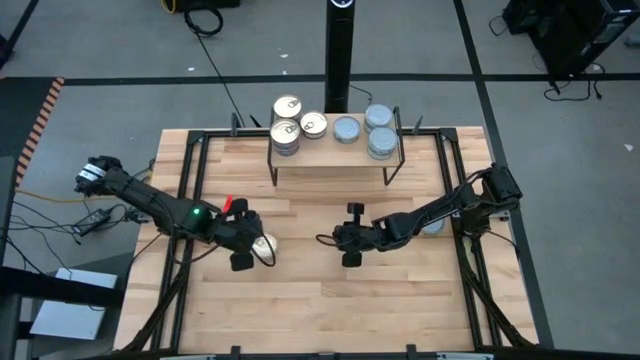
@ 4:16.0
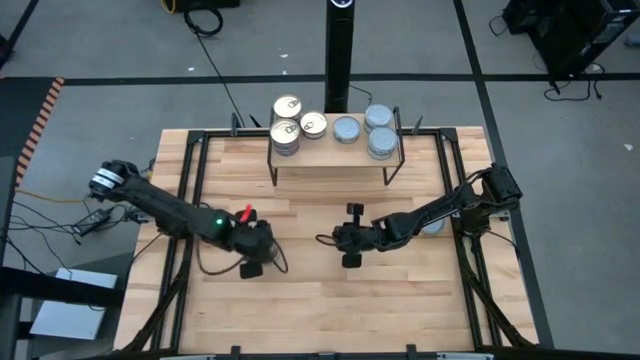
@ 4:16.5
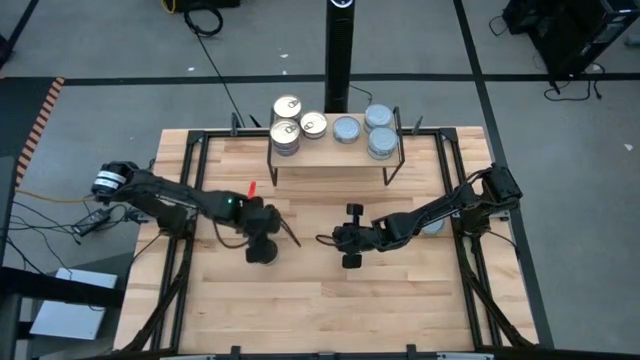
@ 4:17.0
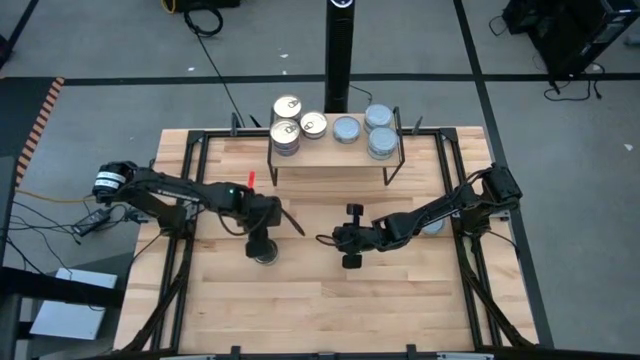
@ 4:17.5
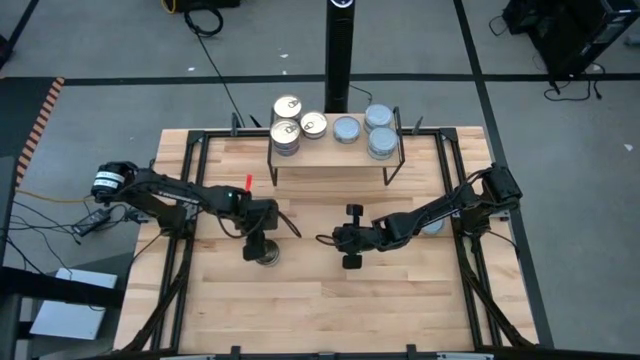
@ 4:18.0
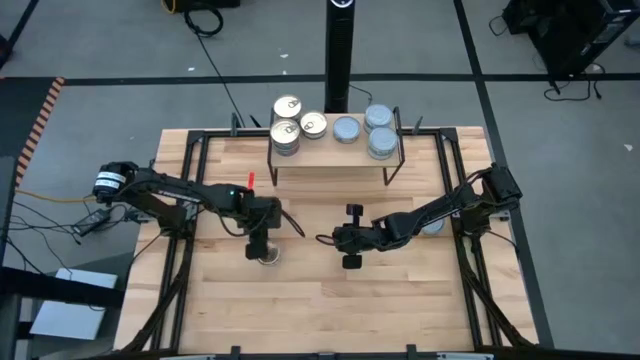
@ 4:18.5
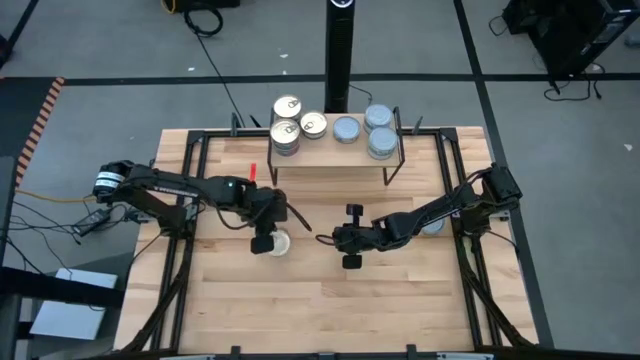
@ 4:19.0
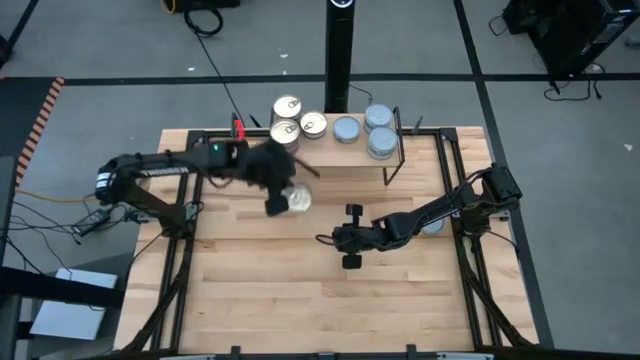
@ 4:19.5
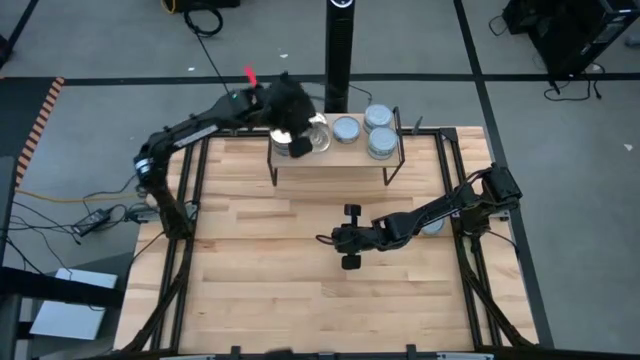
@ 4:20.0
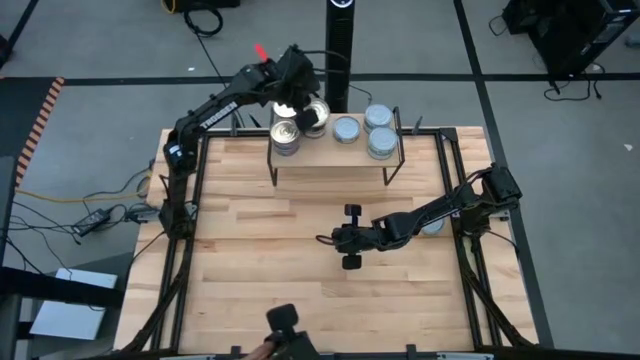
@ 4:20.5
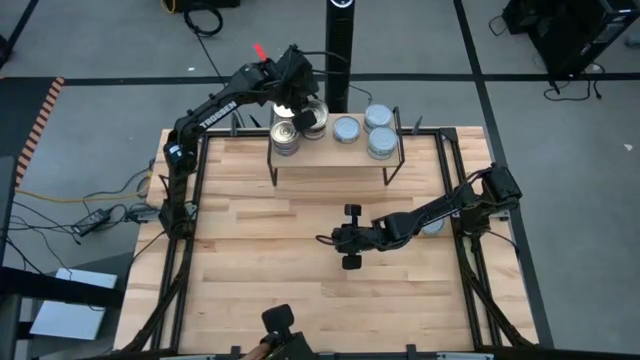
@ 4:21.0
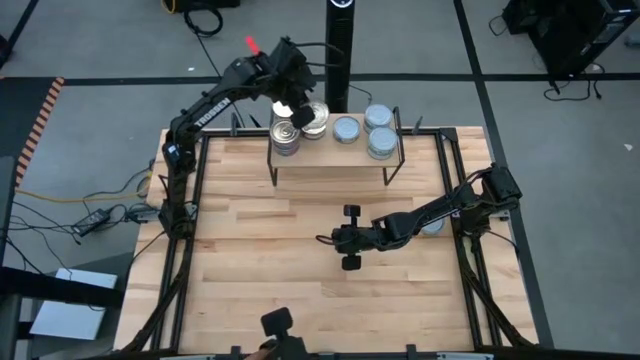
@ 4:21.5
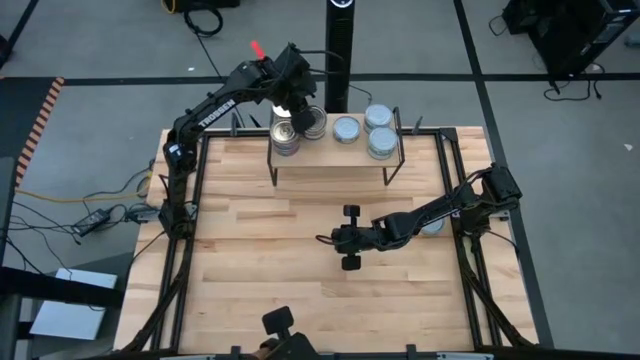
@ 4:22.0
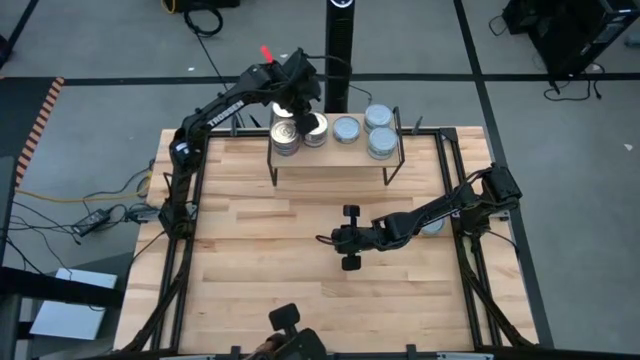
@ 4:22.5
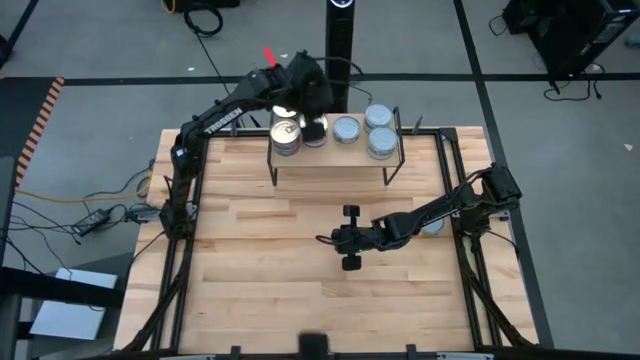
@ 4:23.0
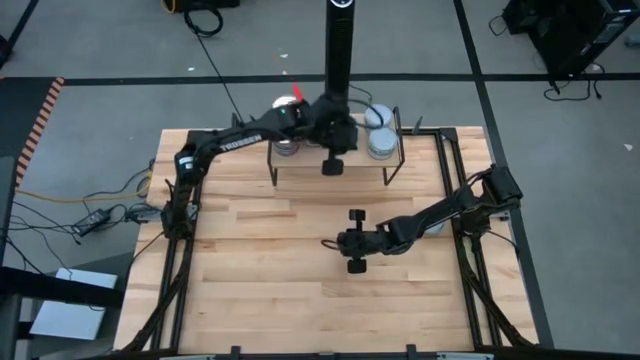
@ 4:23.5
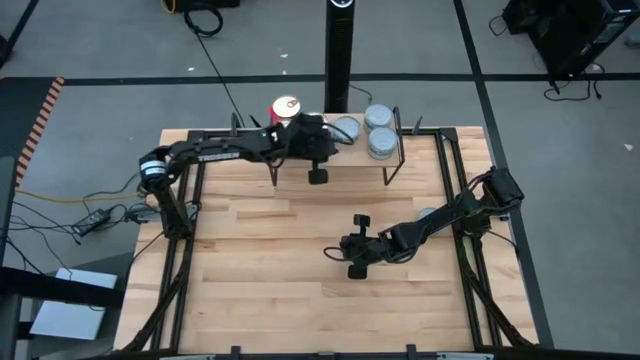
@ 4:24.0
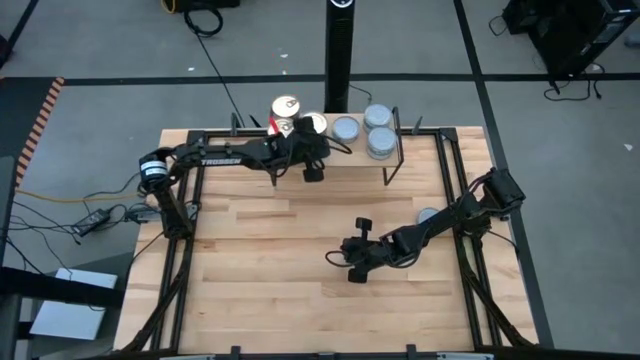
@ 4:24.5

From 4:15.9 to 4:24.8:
Task: Stack canned seafood by type on shelf
Stack the blue pink tuna can on the right blue tuna can on the shelf

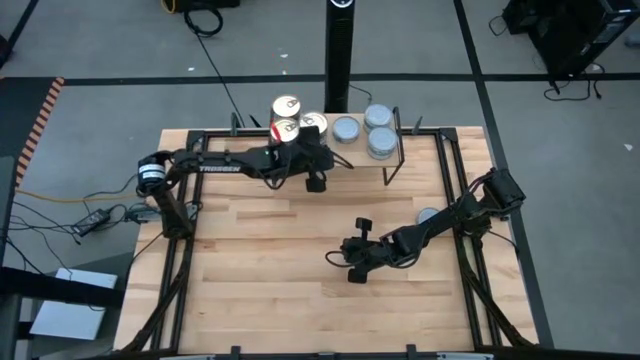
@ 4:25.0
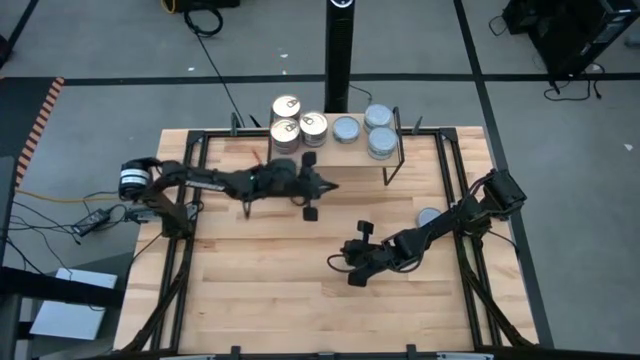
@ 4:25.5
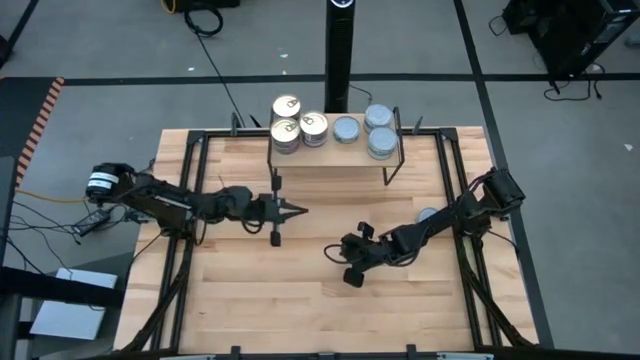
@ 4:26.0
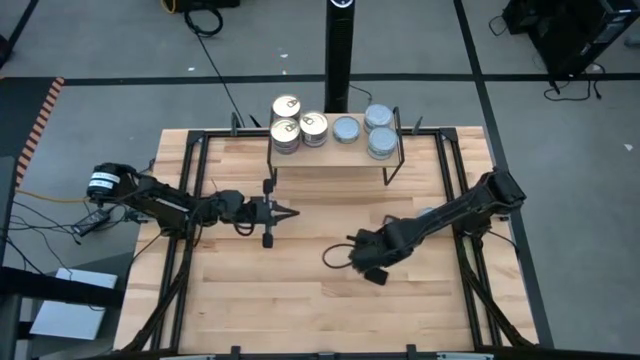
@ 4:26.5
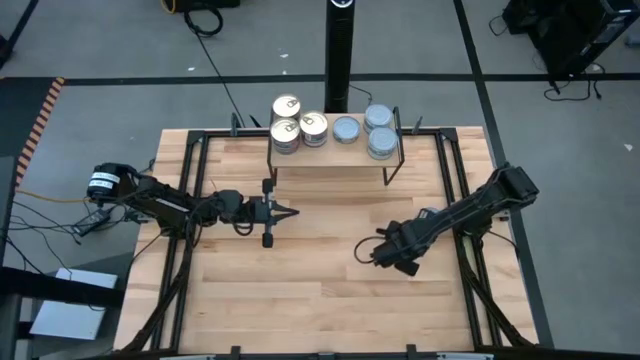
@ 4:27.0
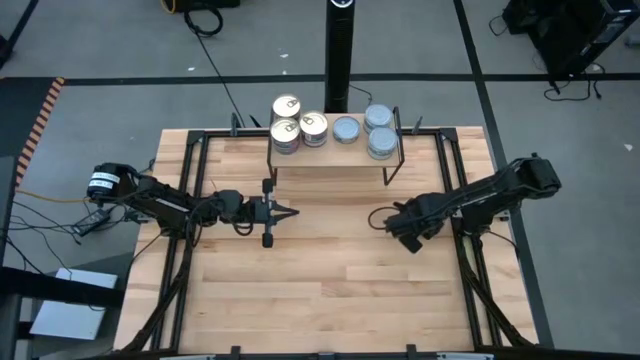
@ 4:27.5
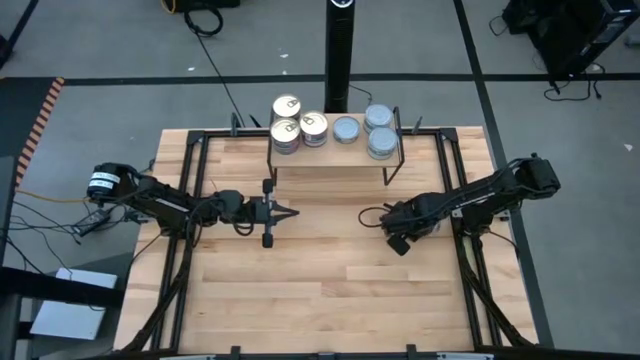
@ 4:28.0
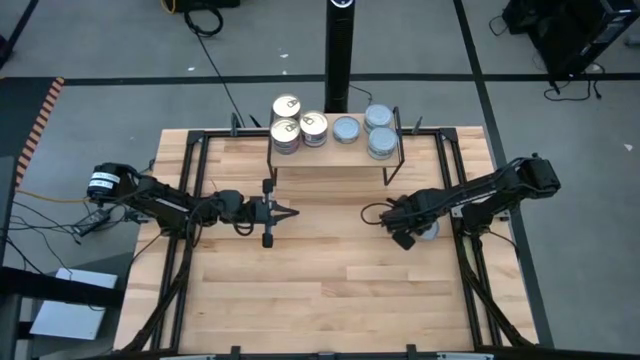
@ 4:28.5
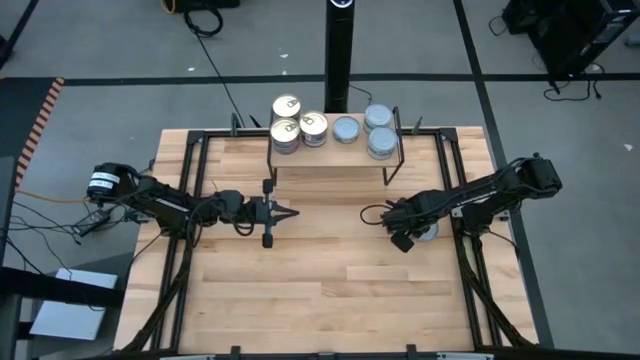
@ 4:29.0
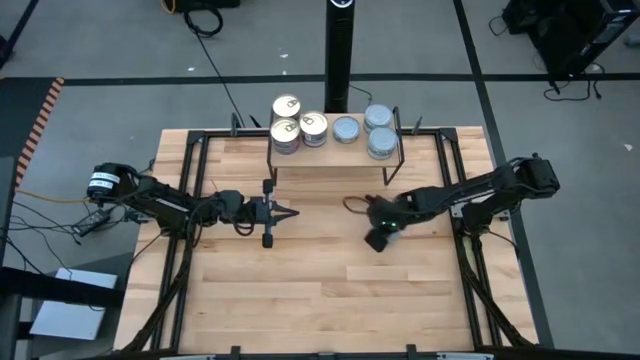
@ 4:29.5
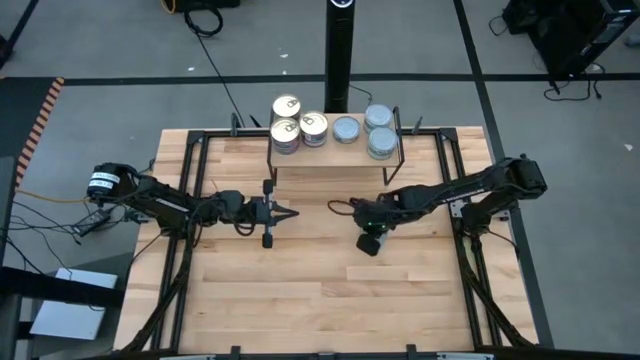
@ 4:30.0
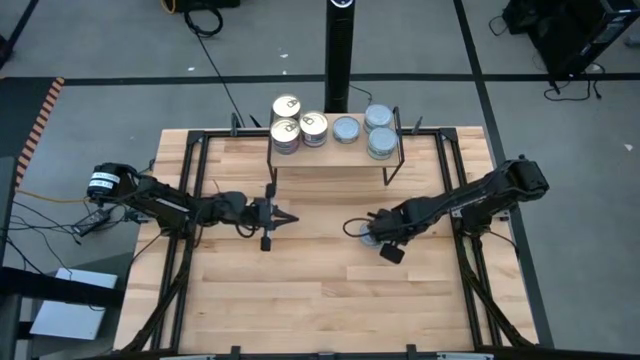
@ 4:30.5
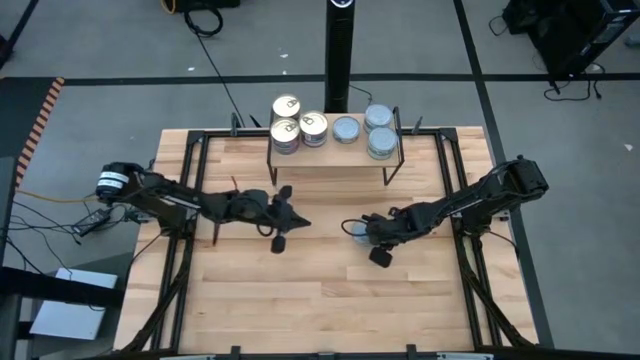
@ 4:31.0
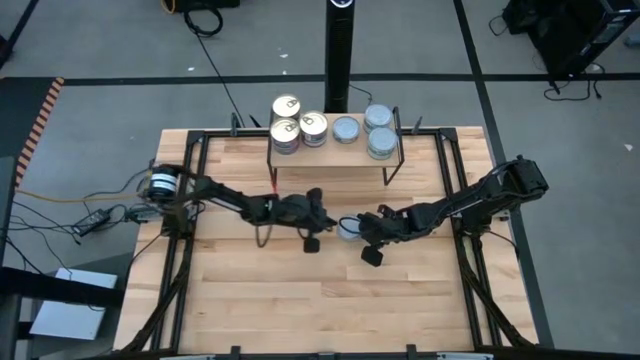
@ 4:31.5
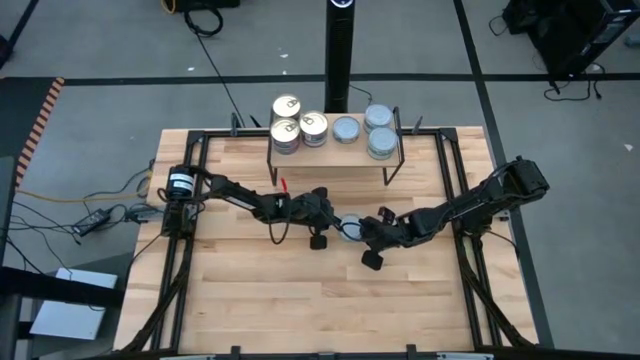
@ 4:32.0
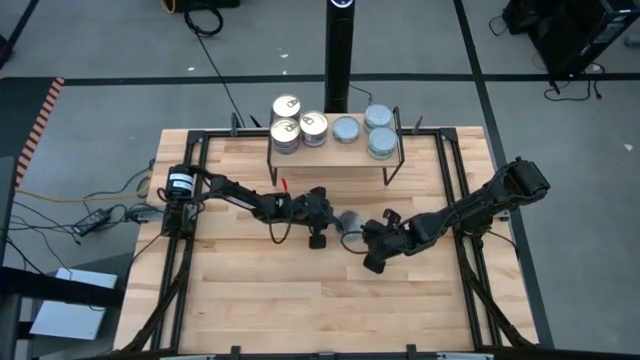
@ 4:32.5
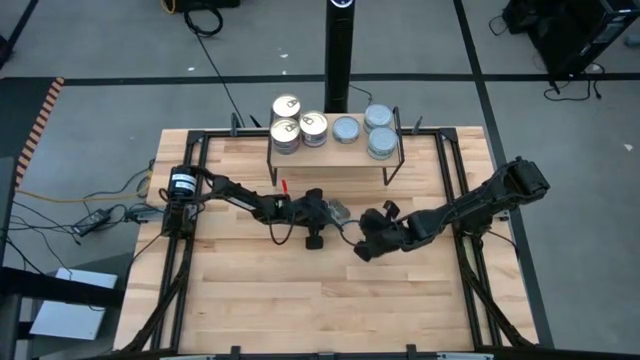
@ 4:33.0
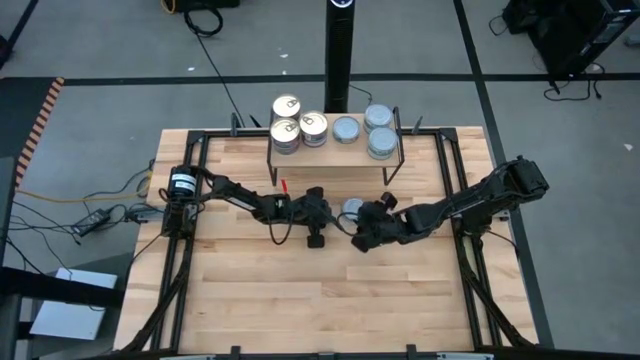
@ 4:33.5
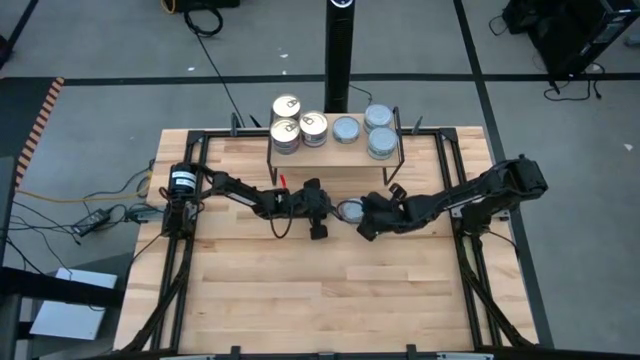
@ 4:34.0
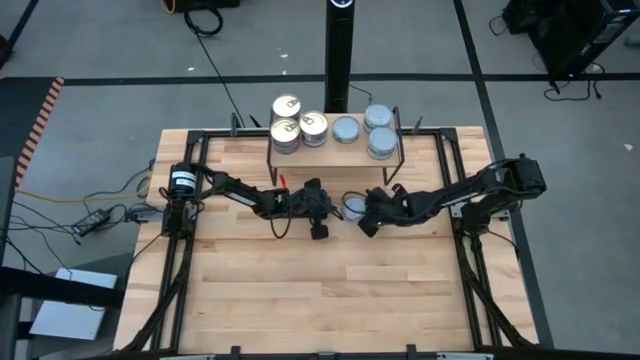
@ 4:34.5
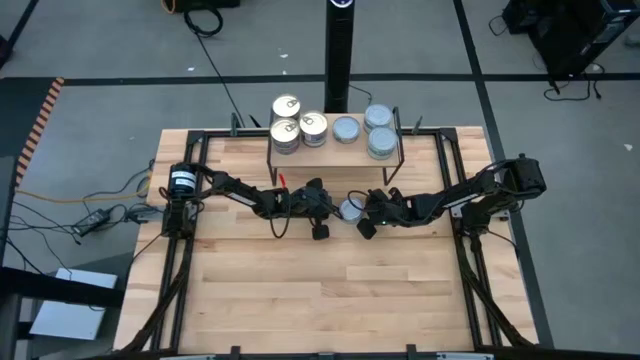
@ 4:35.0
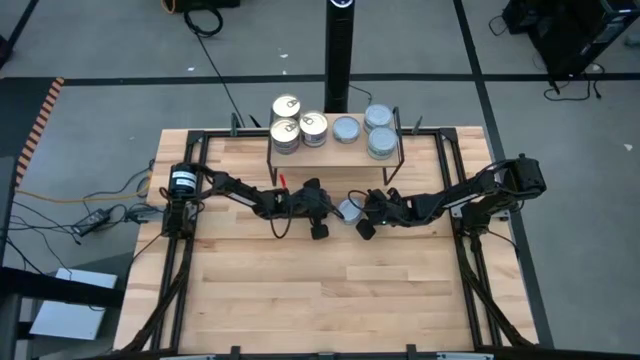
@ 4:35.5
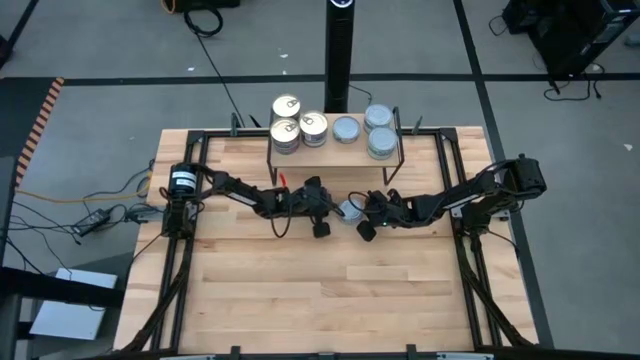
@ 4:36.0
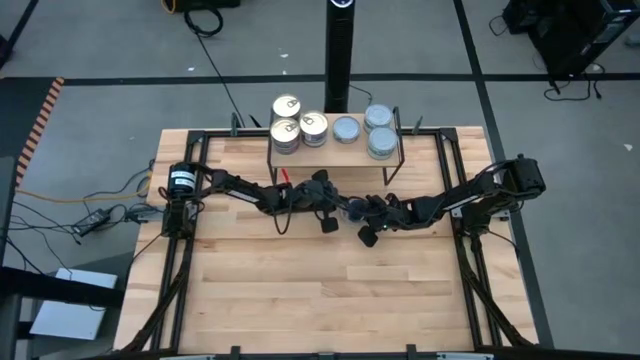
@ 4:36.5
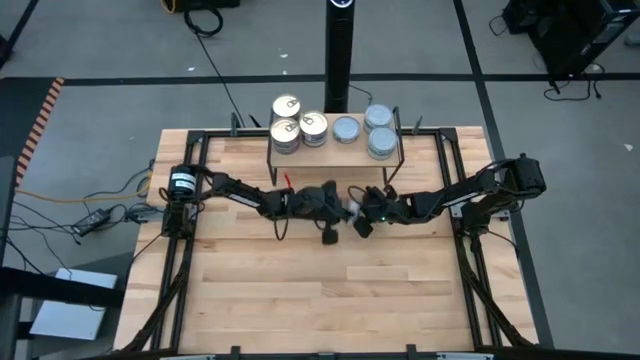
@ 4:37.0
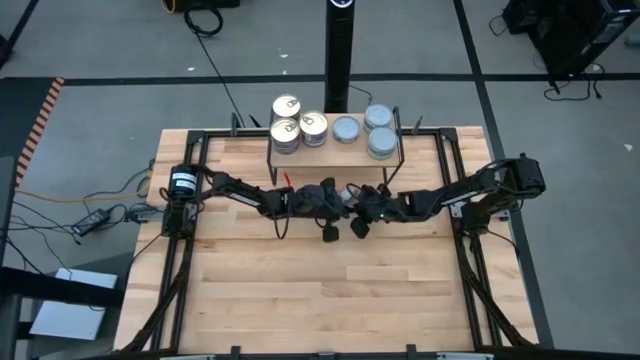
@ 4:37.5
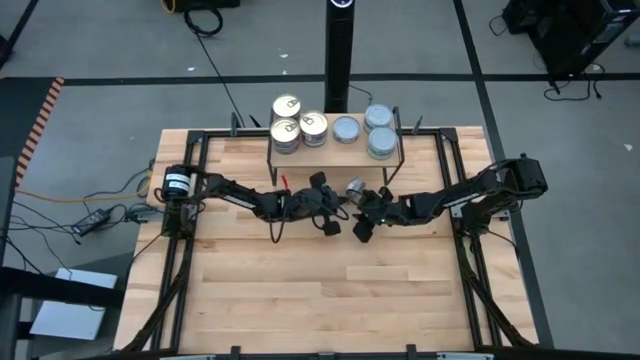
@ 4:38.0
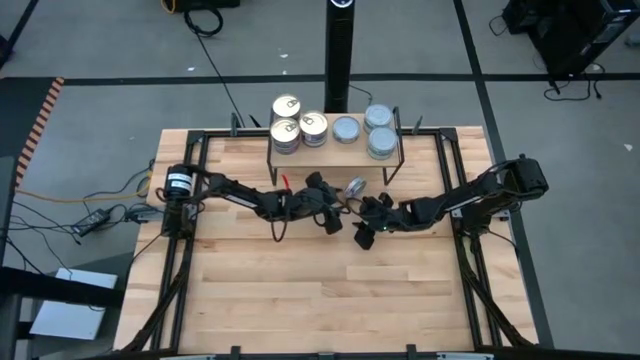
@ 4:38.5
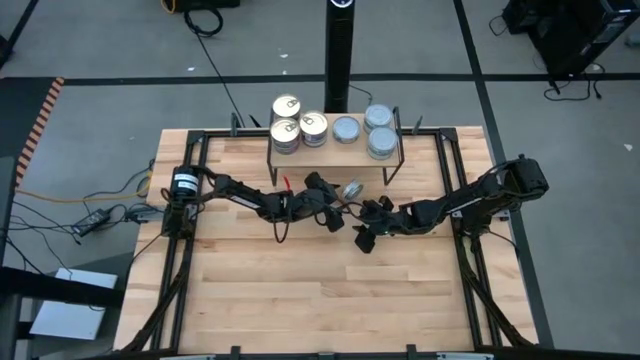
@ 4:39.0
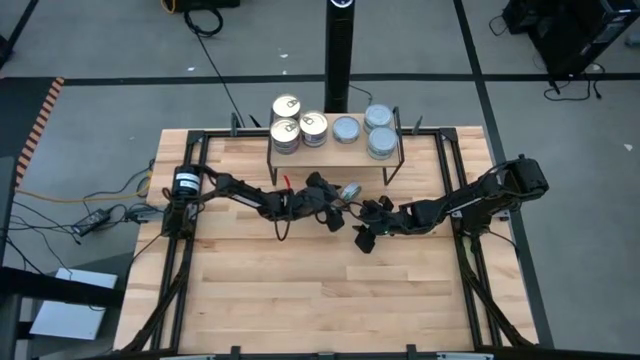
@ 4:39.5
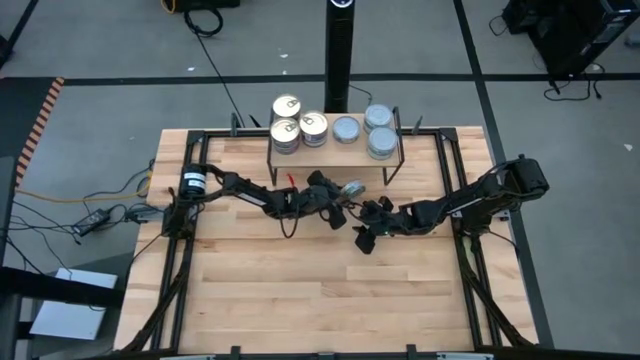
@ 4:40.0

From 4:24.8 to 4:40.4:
Stack the green tuna can on the left green tuna can on the shelf
